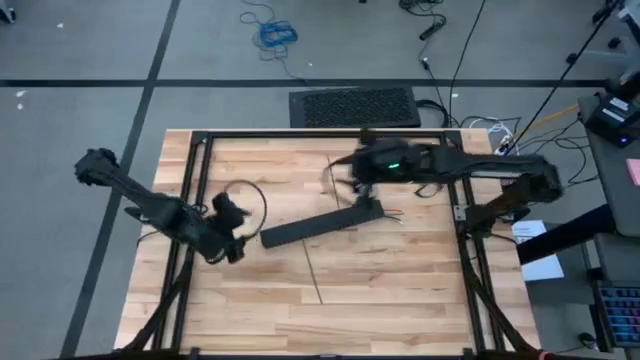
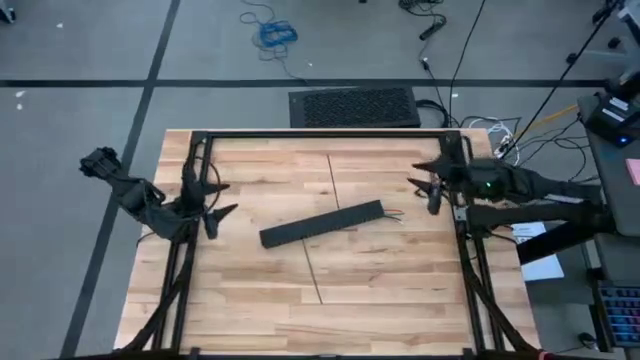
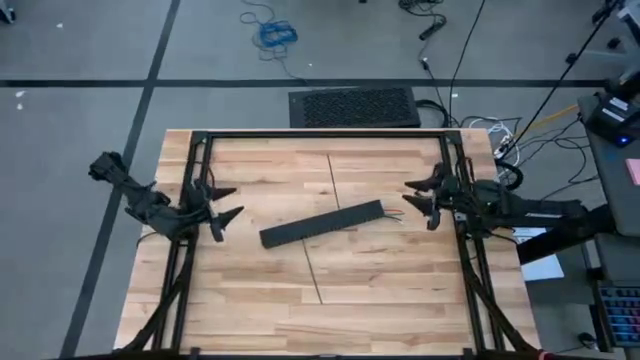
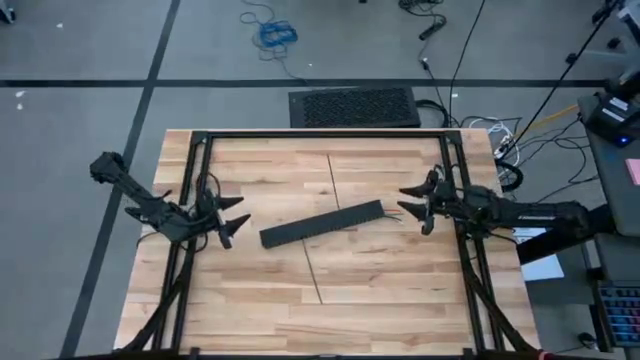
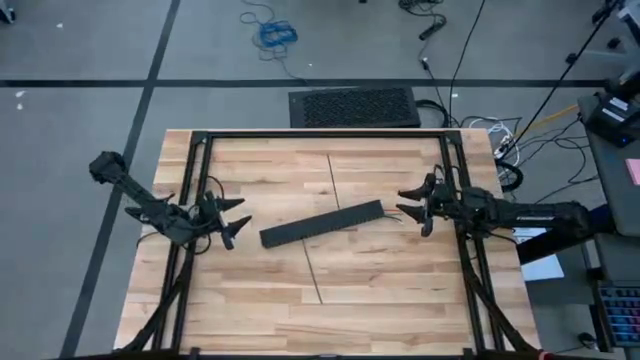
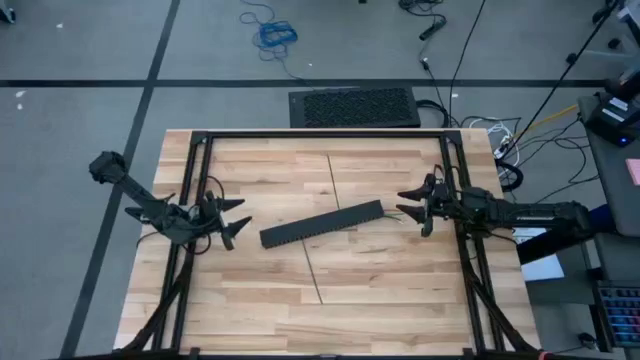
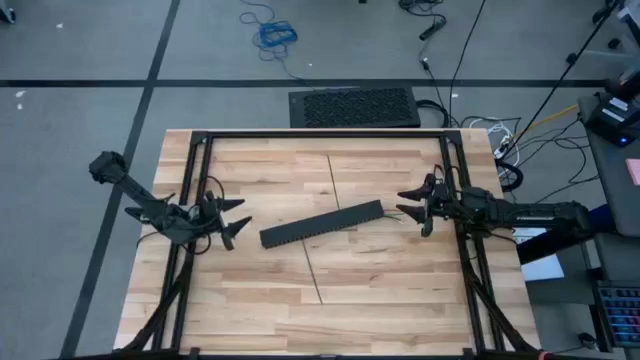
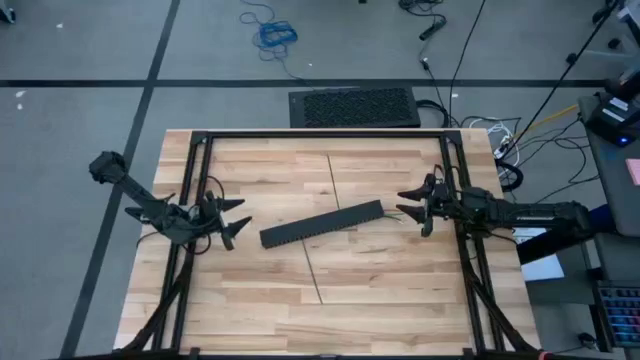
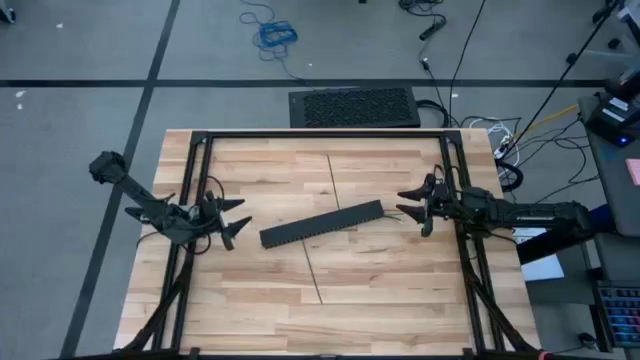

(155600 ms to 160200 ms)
Task: Ziptie cables
Return to Home Position

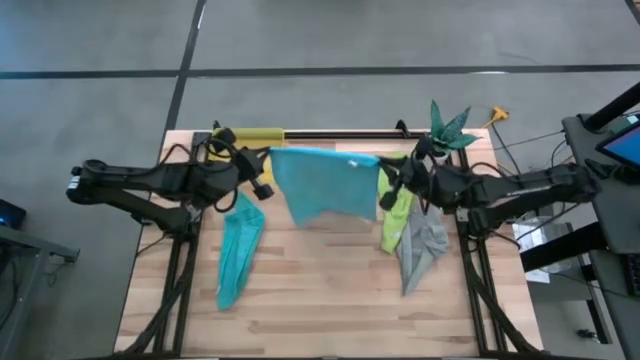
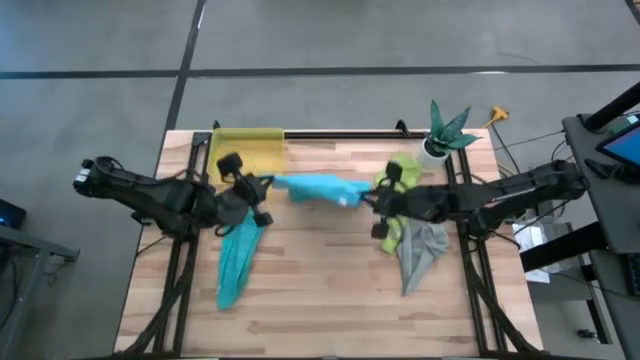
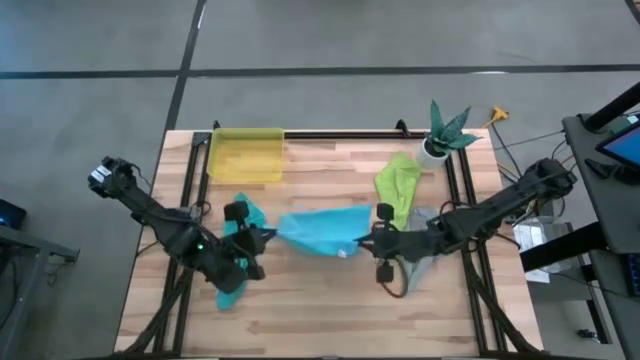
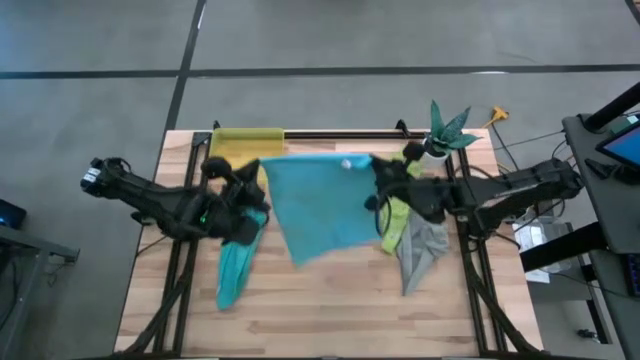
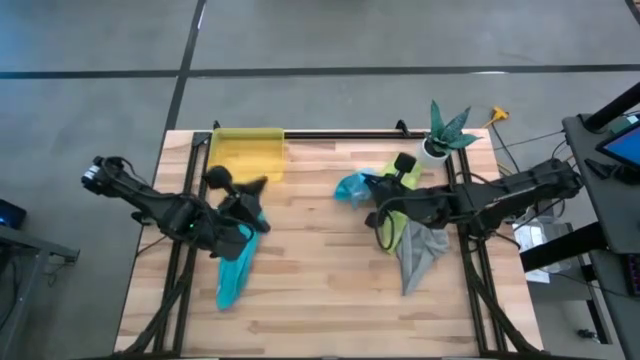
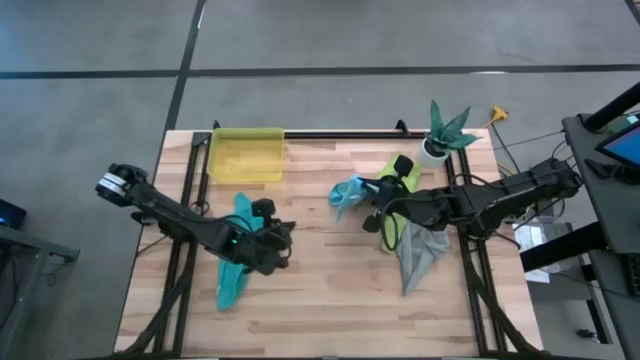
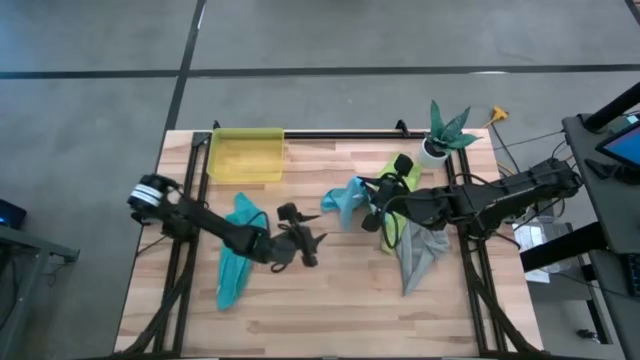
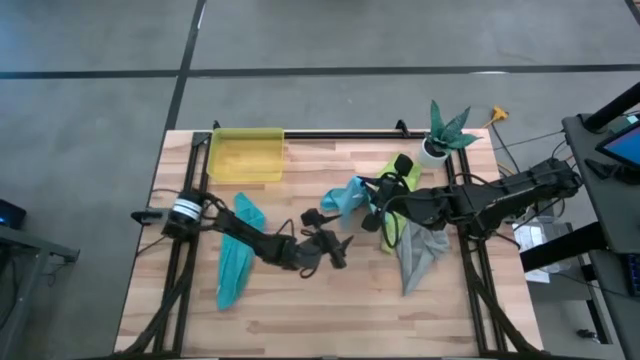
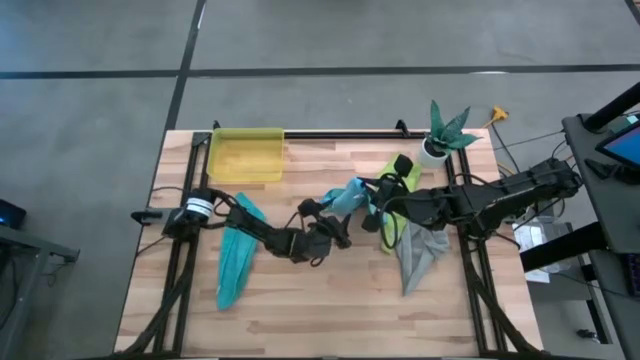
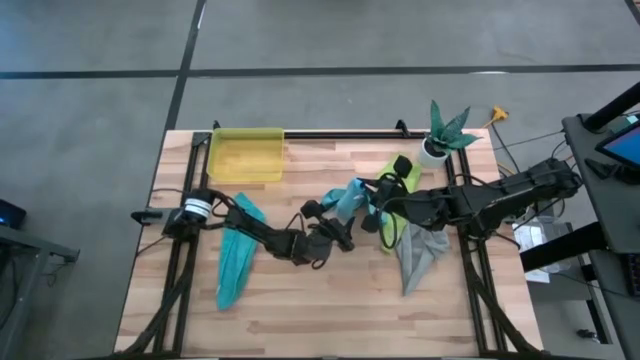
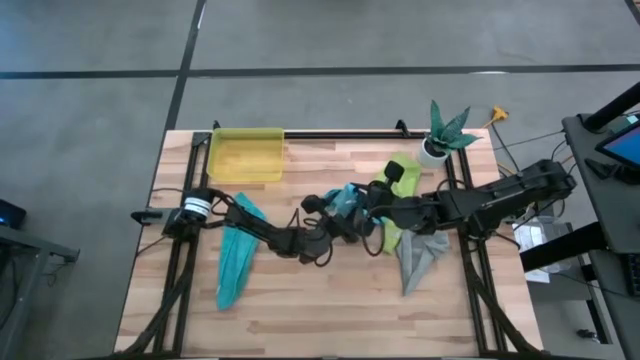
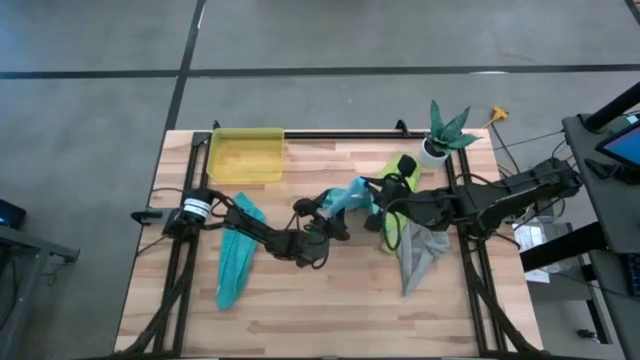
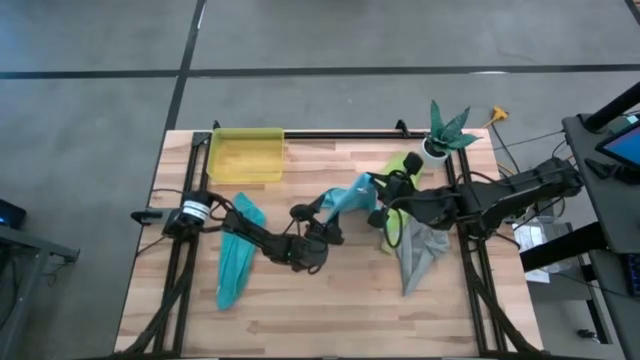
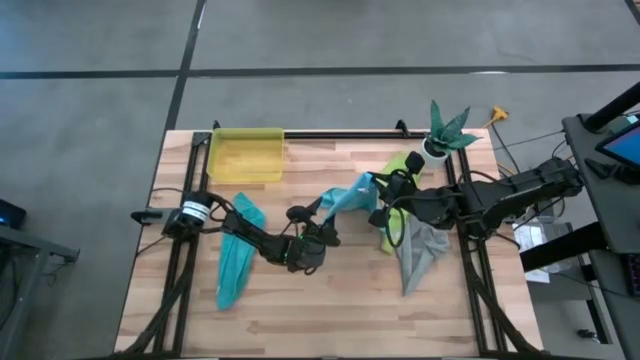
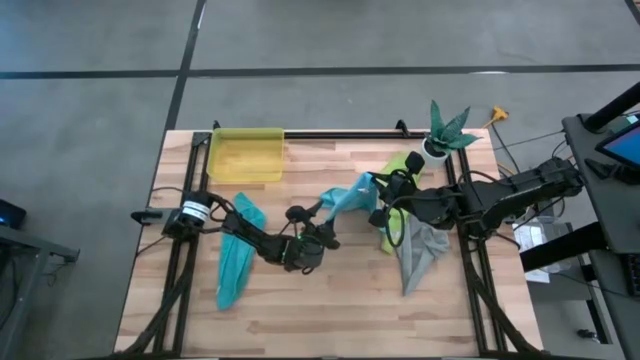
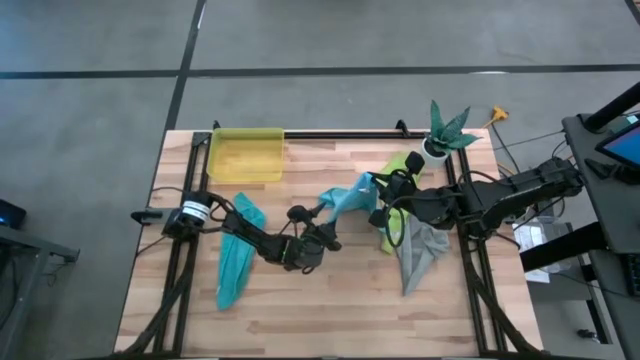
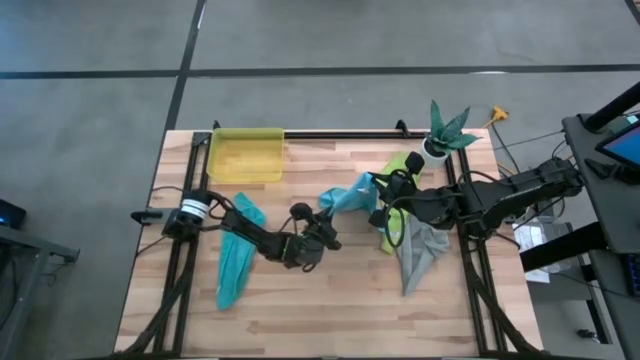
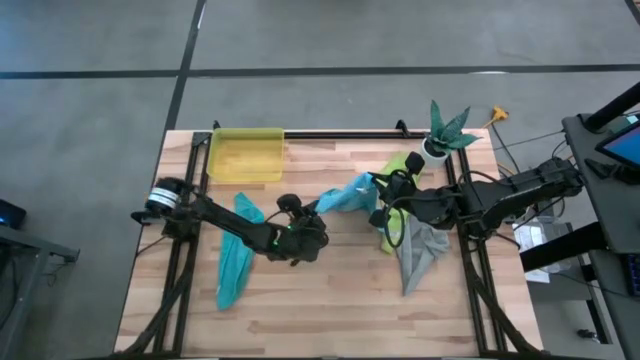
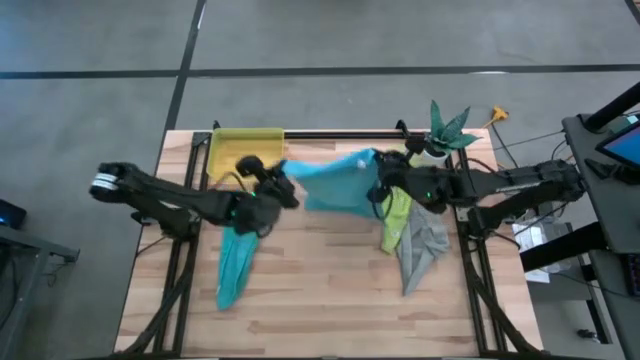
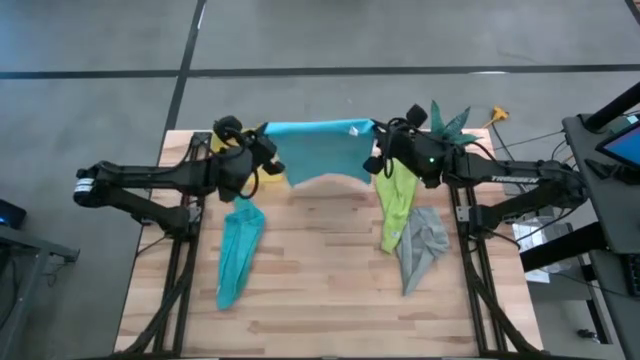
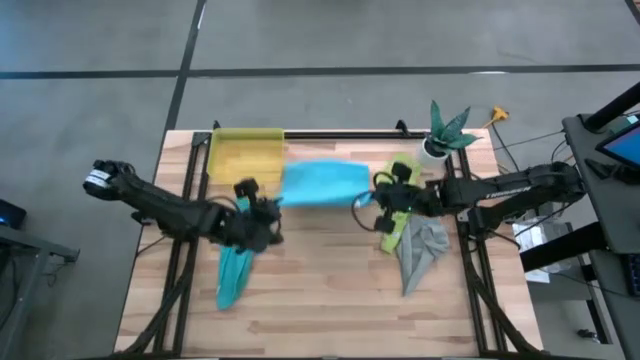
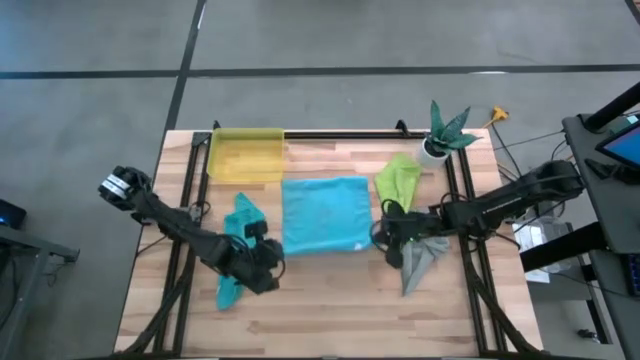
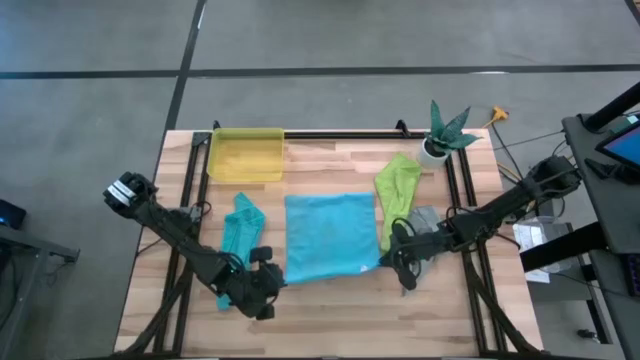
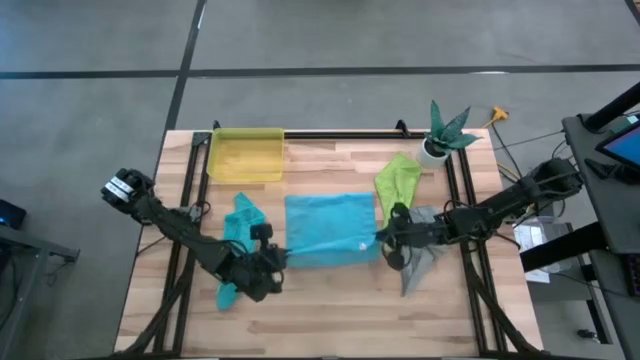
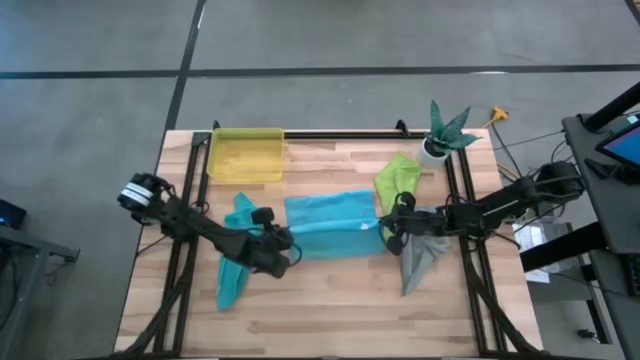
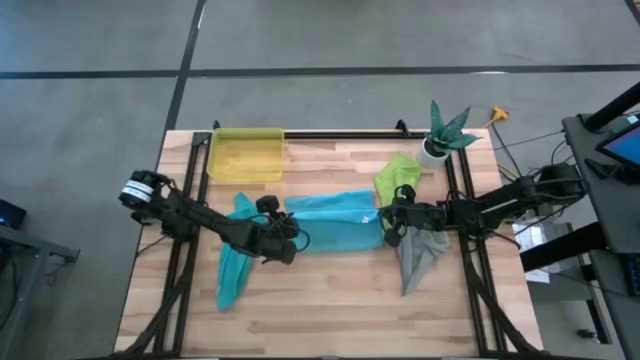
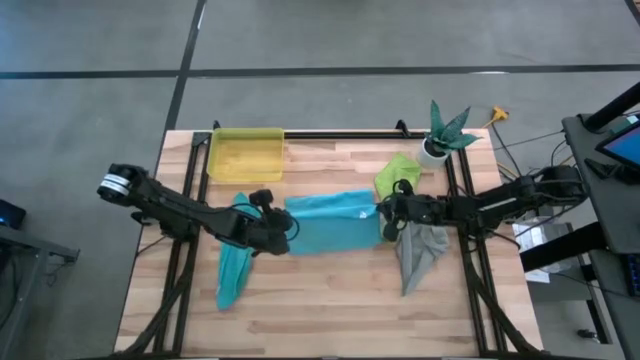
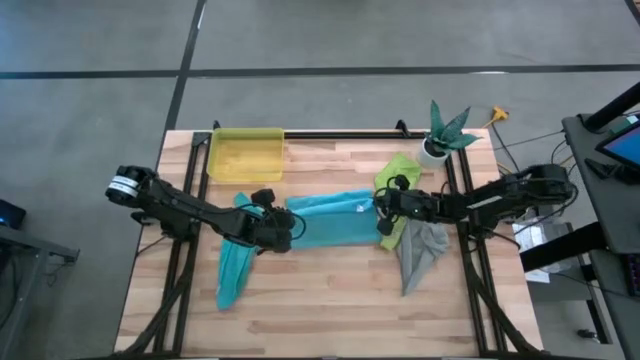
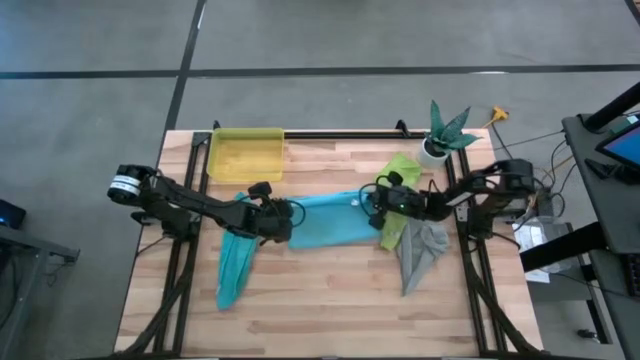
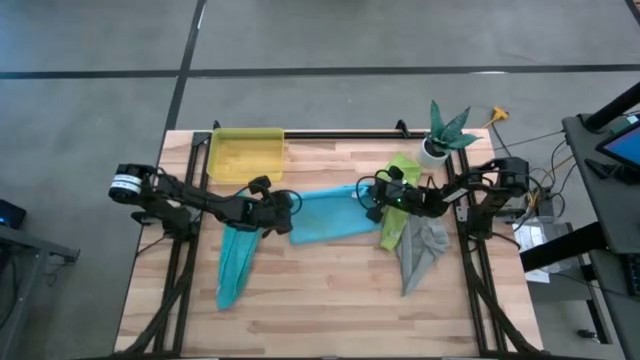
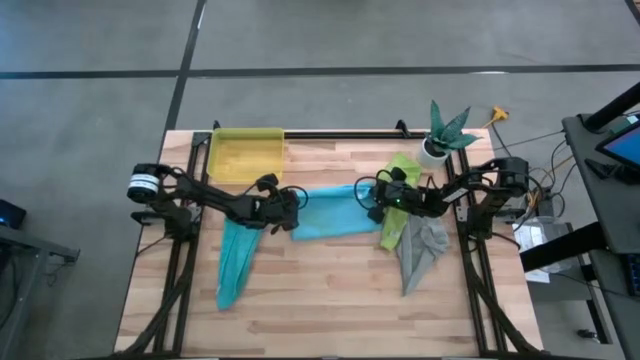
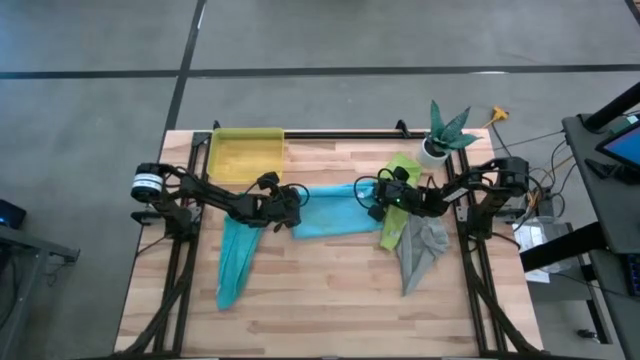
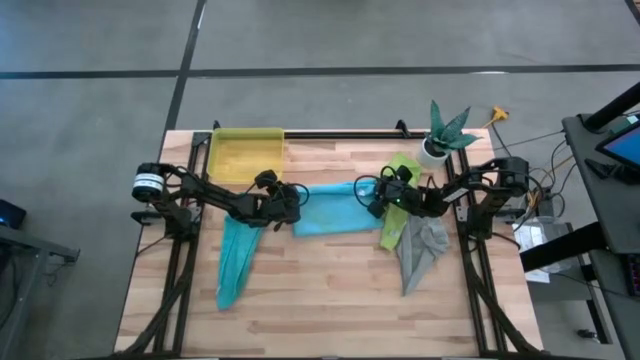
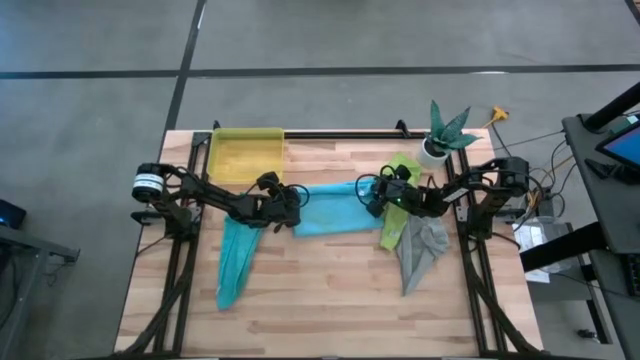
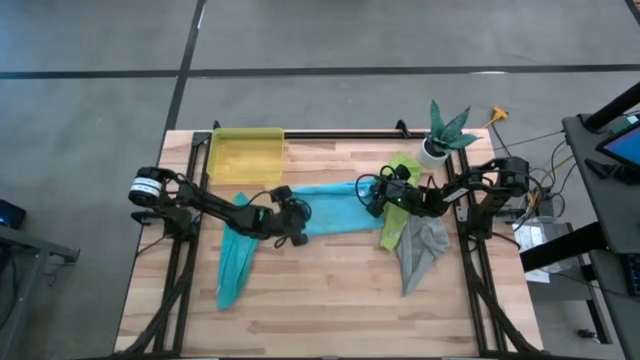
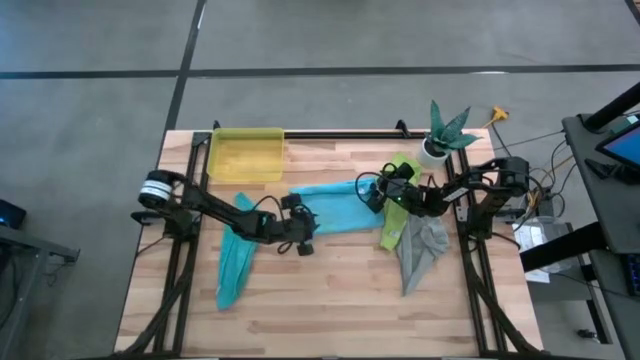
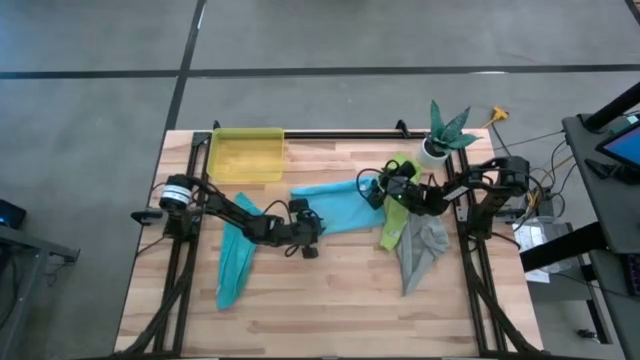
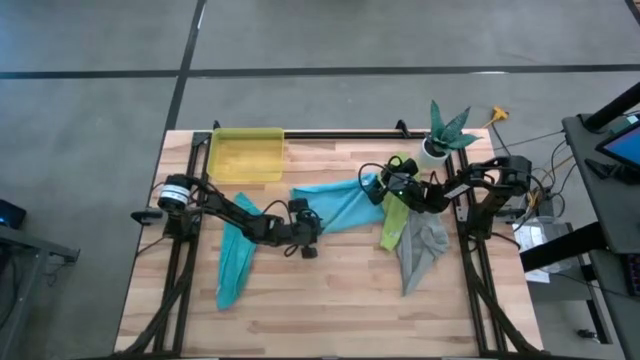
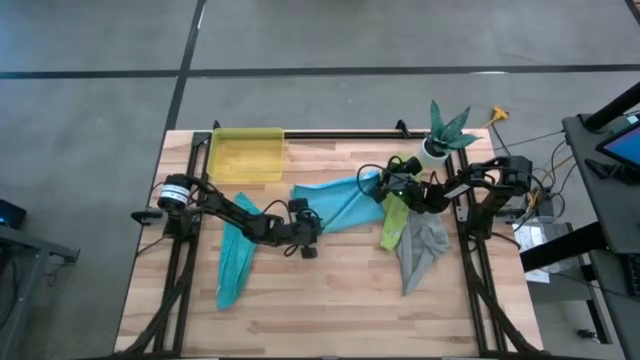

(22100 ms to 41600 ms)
Task: Roll microfiber towels into tight, uniform cylinder then place into a basket
Roll the right light blue towel
